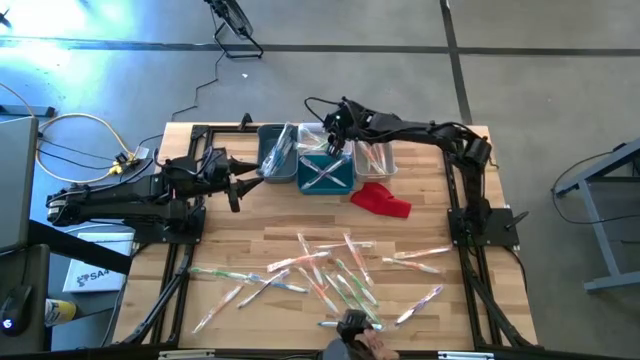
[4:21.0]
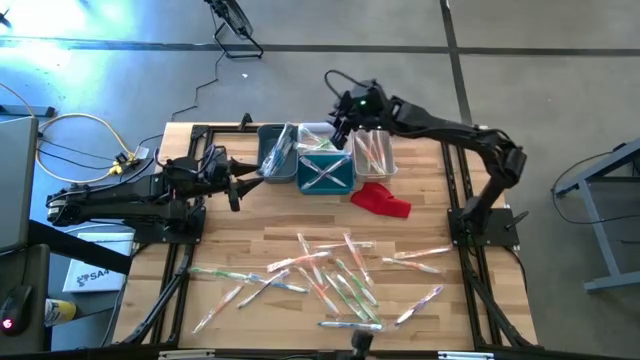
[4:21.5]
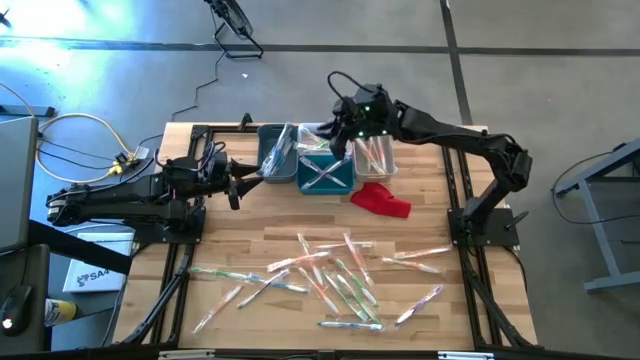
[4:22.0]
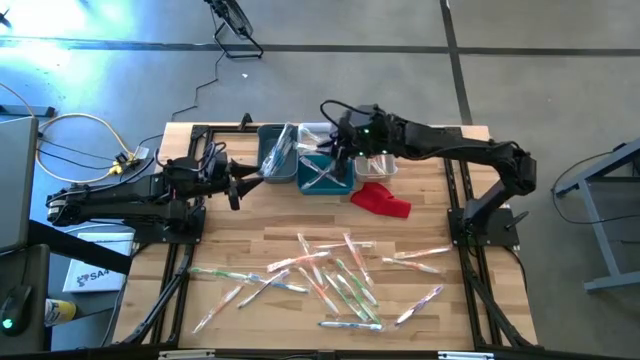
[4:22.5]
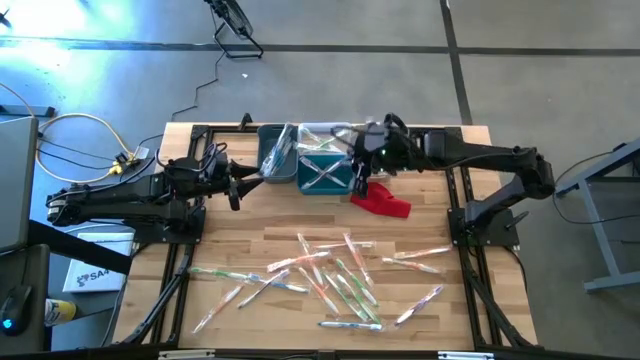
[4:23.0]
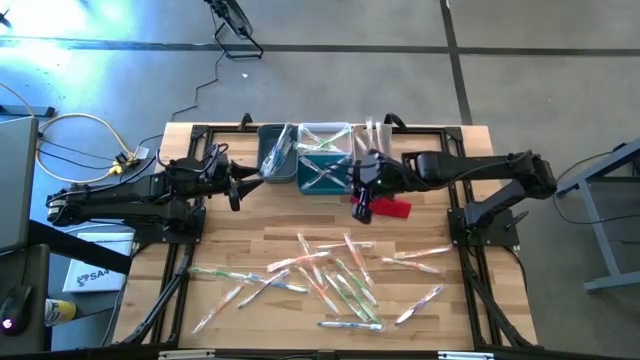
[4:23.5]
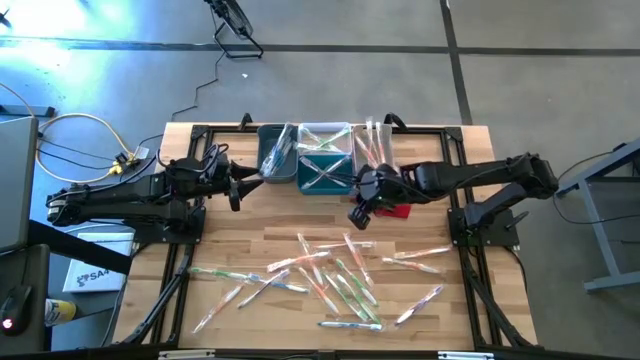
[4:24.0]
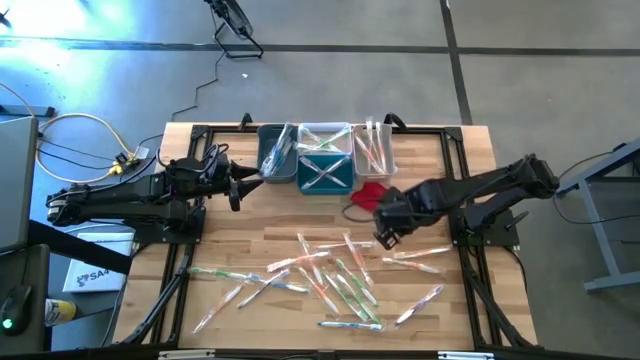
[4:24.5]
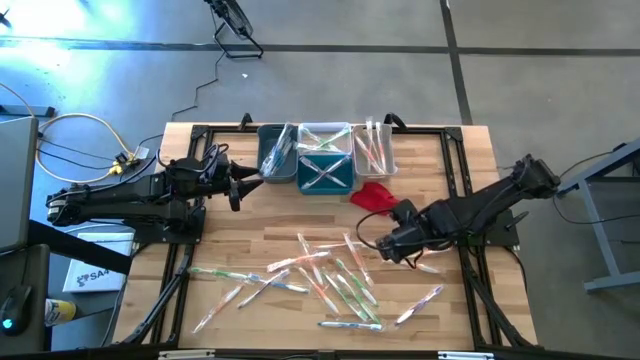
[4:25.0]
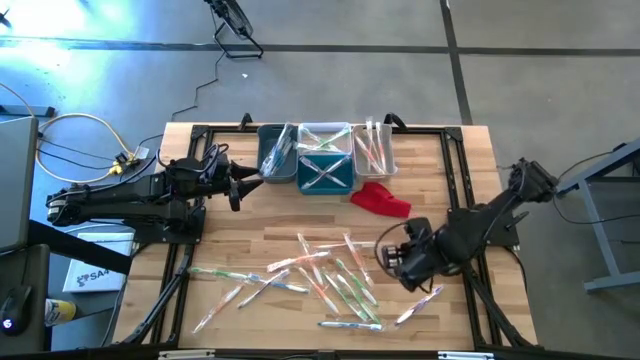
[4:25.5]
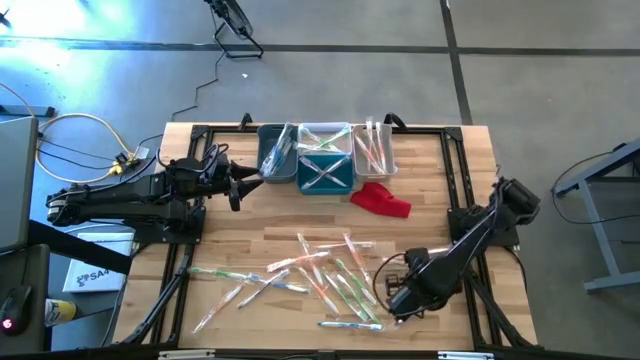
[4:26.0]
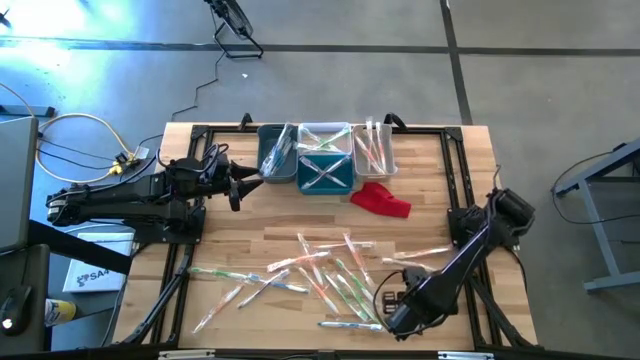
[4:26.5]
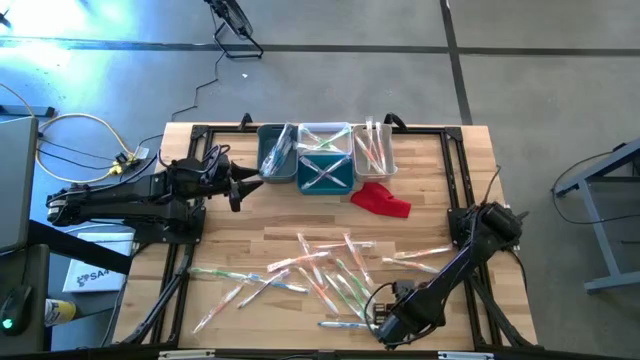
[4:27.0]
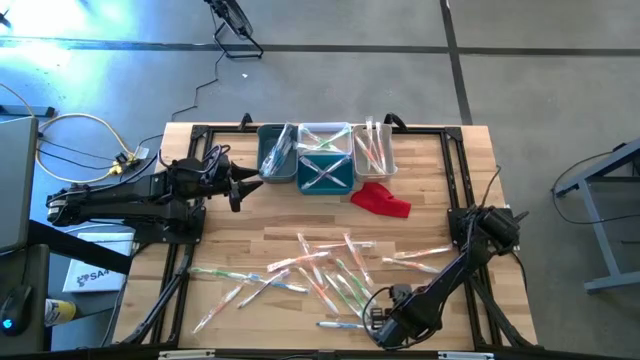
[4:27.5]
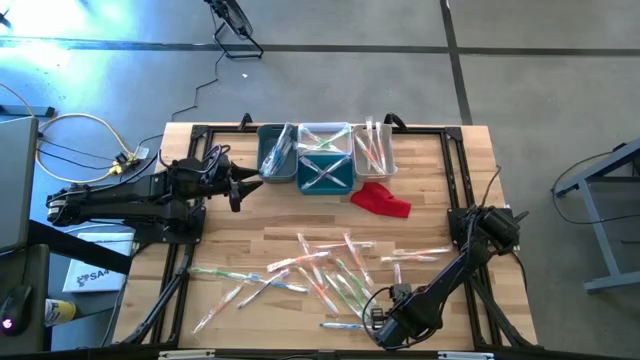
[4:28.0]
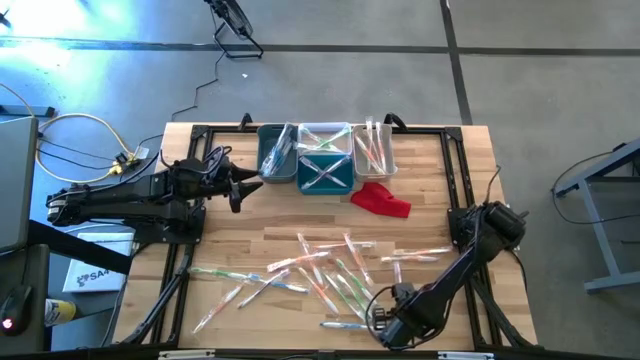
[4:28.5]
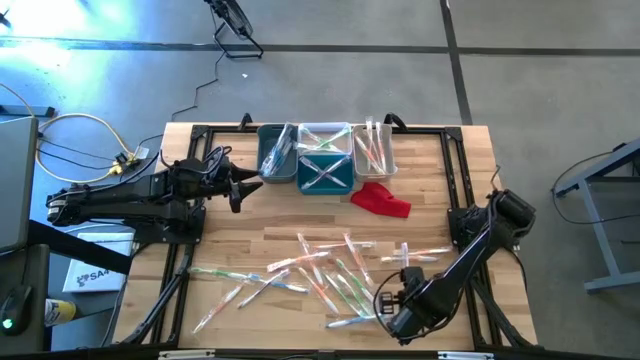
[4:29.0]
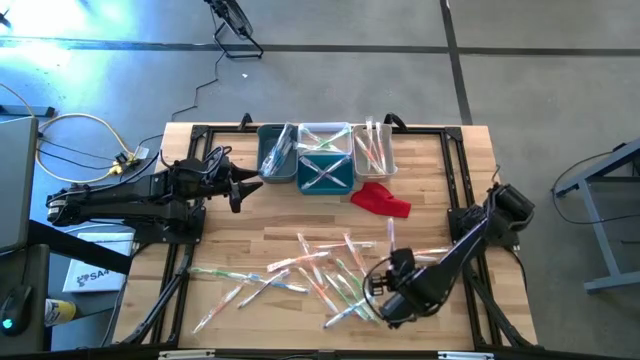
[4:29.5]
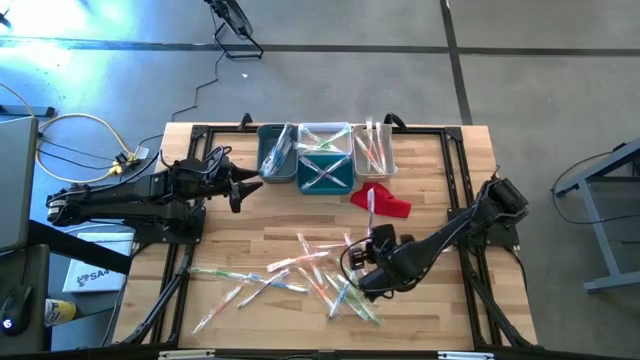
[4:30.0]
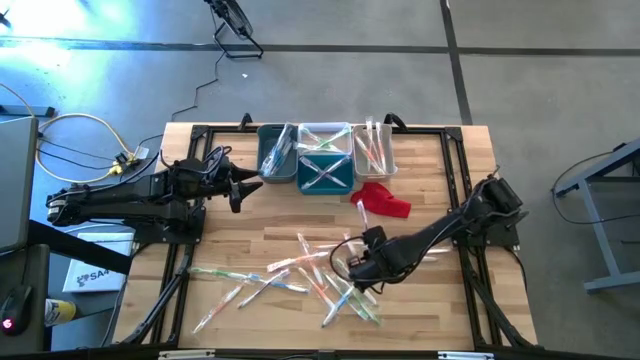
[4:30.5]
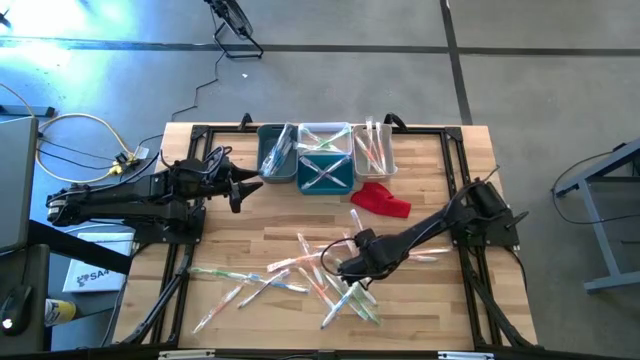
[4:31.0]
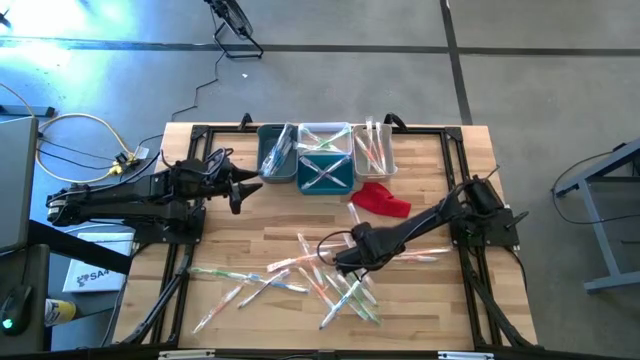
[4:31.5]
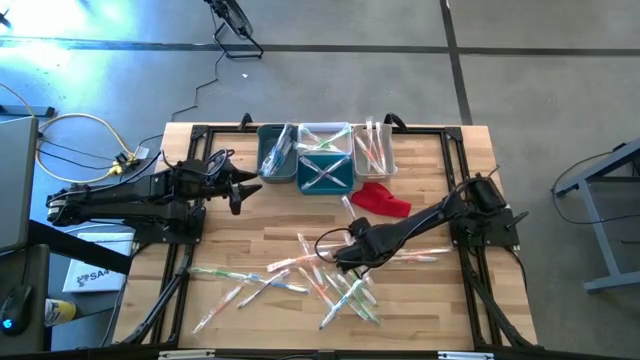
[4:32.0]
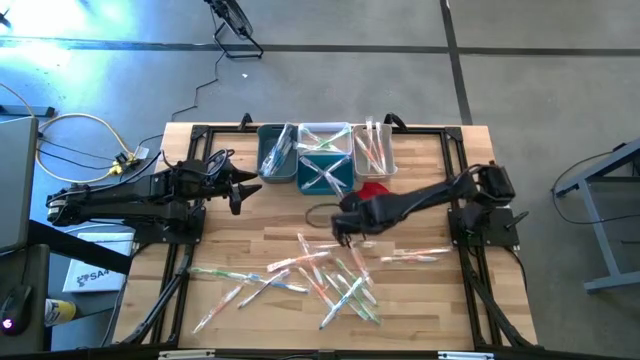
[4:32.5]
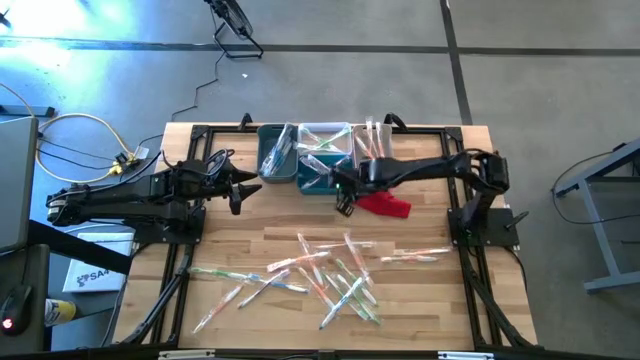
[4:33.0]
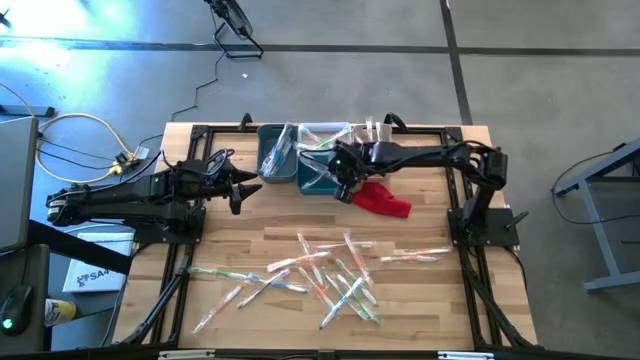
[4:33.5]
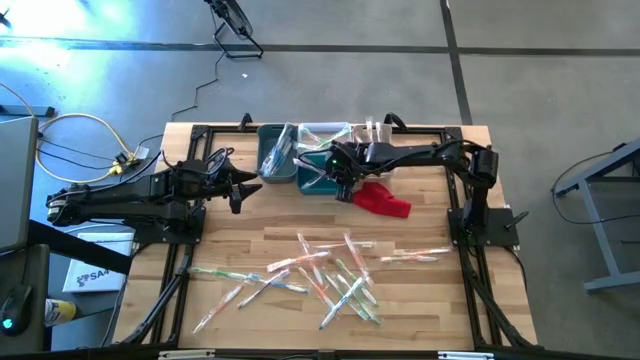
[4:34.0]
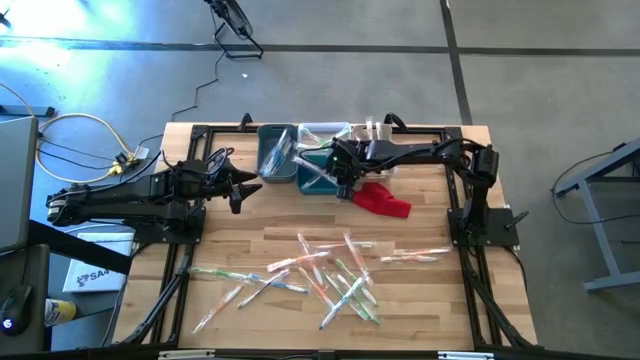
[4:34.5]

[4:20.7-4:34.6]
Task: Pick & Place Toothbrushes
Put the right purple toothbrush into the blue bin

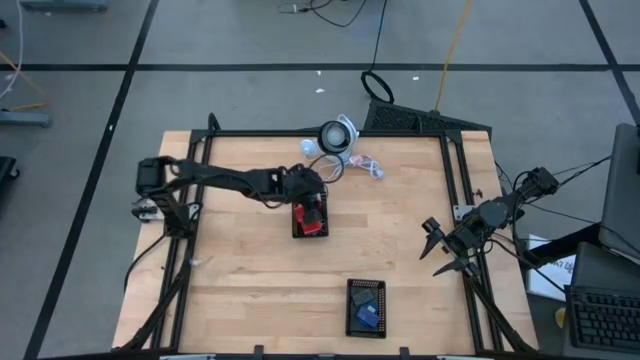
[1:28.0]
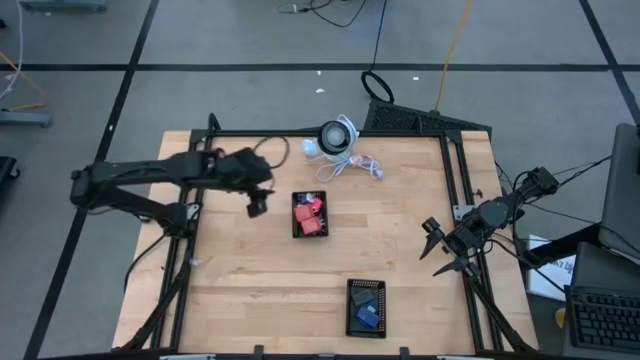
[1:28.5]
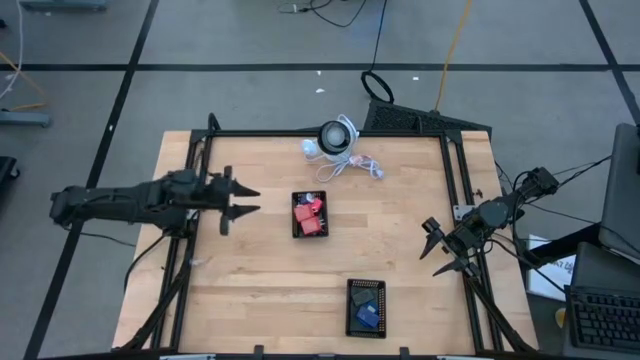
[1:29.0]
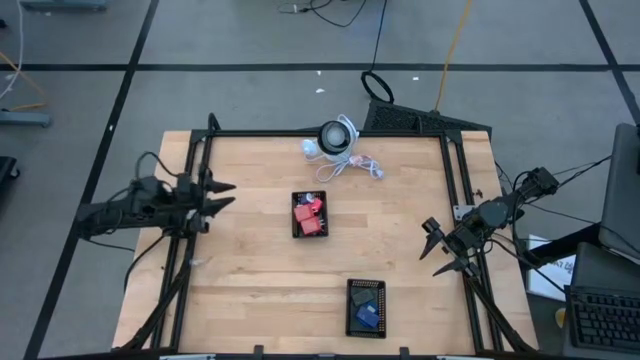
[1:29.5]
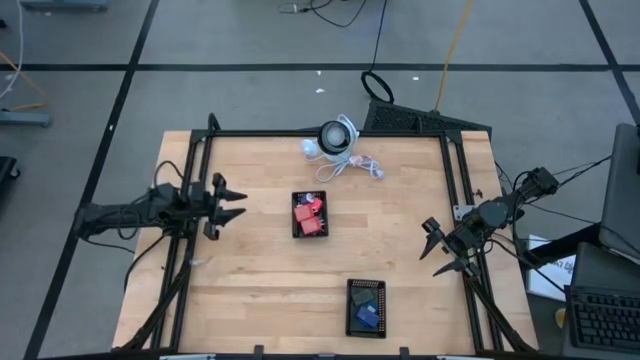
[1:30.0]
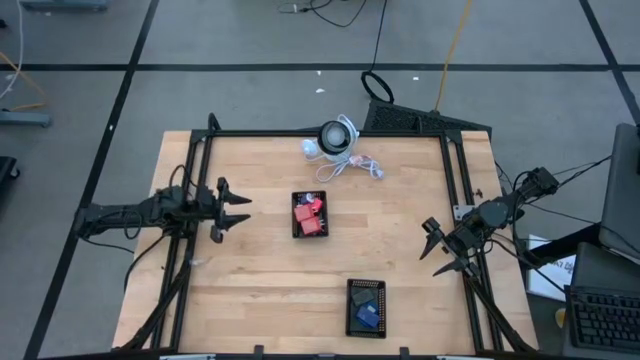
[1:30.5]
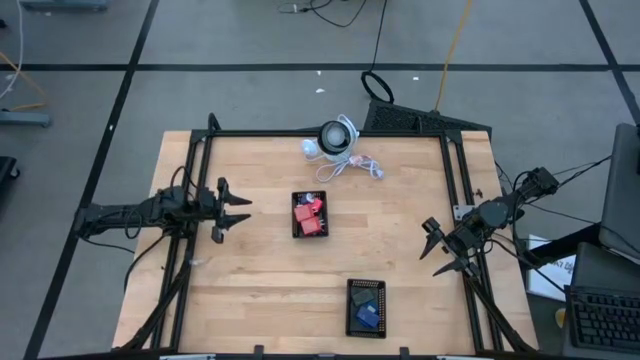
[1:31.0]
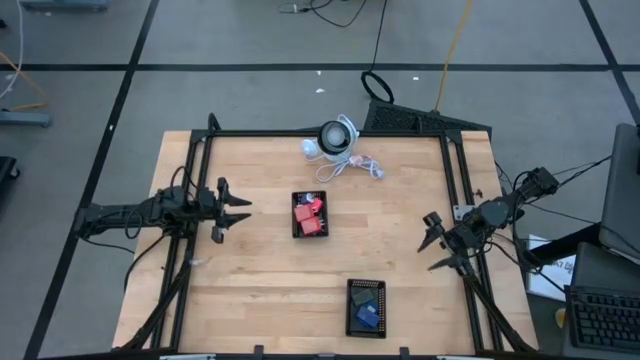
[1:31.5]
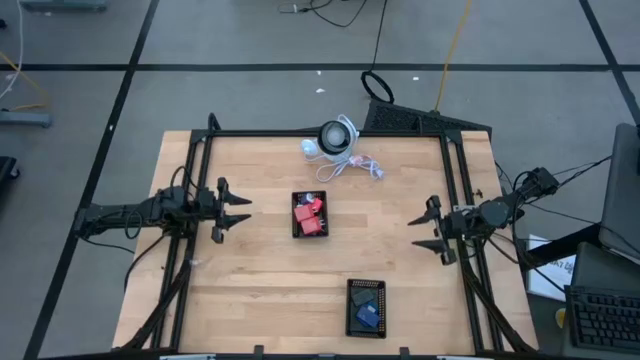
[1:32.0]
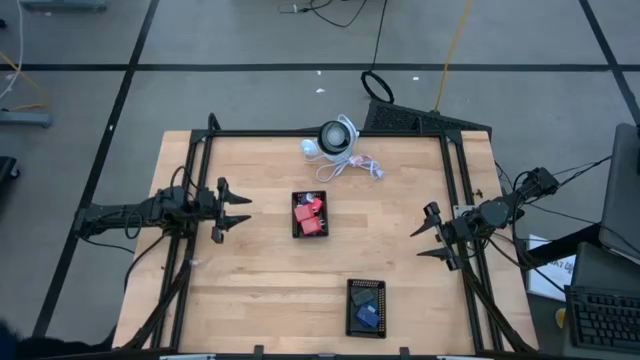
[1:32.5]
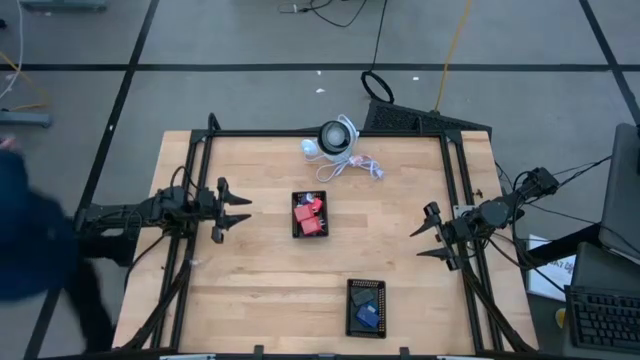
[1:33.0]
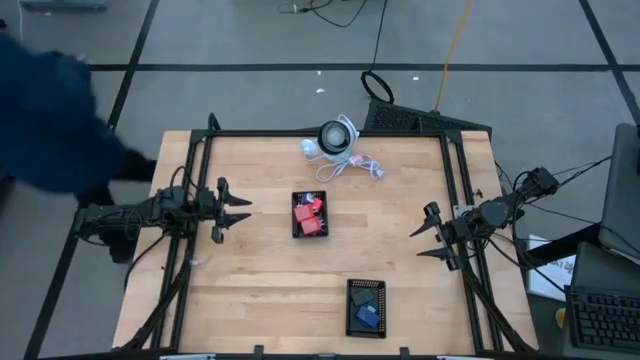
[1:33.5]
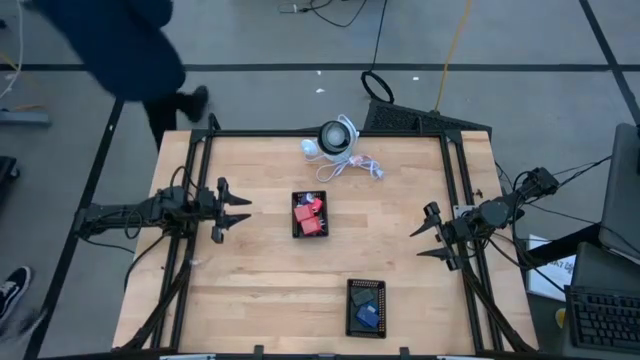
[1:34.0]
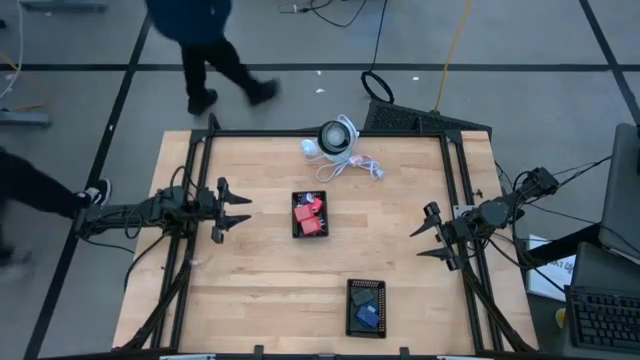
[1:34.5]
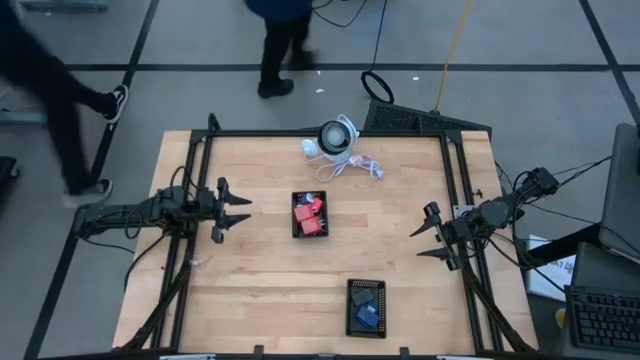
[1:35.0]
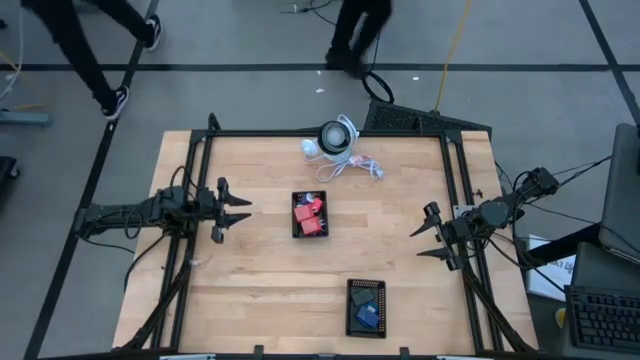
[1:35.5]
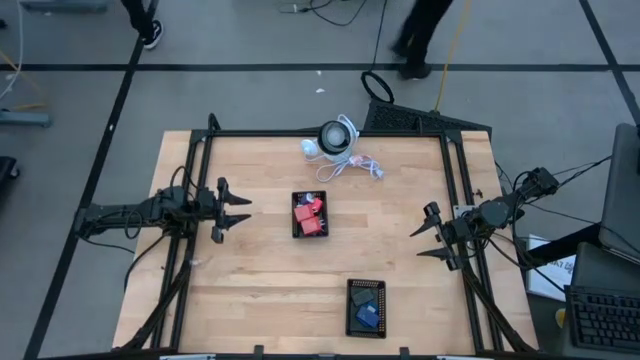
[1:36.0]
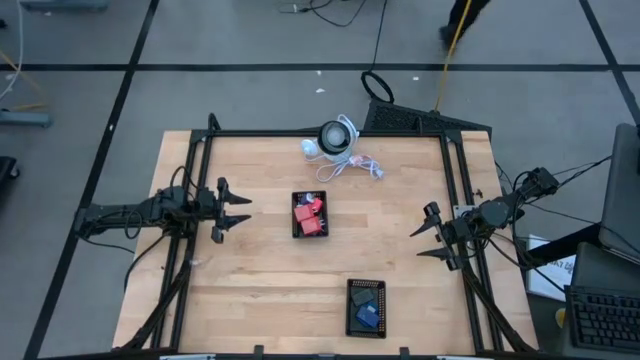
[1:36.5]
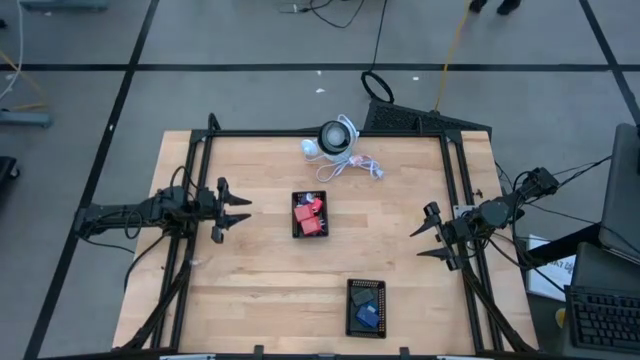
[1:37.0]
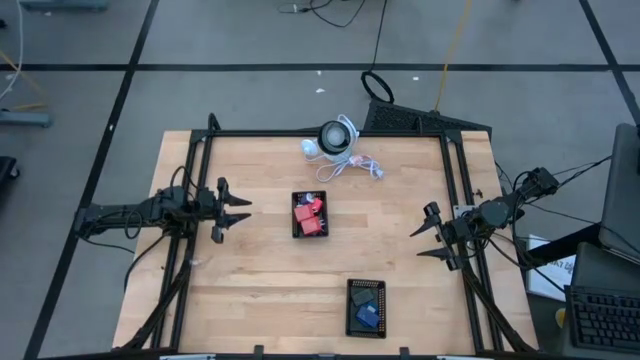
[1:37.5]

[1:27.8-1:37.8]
Task: Pick & Place Office items
Return to Home Position
